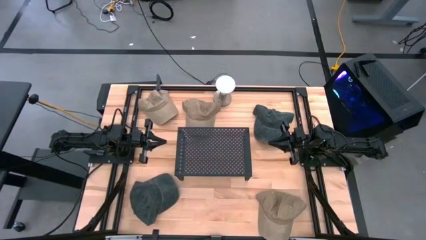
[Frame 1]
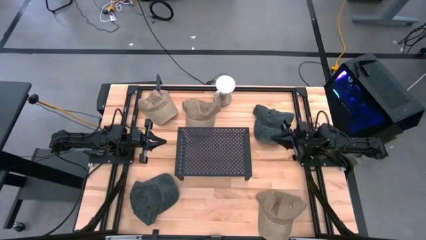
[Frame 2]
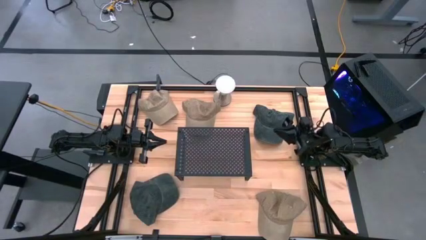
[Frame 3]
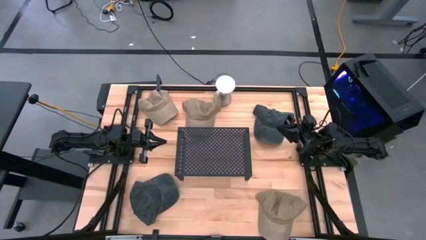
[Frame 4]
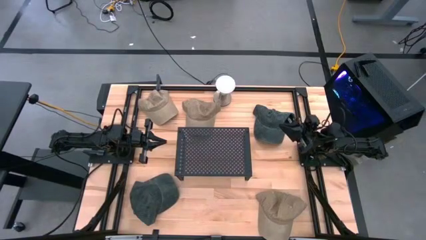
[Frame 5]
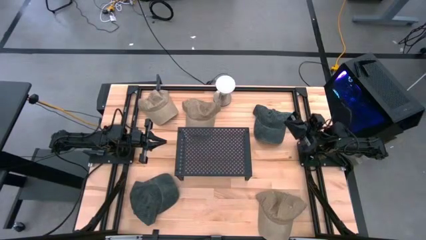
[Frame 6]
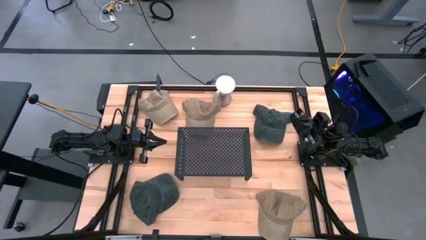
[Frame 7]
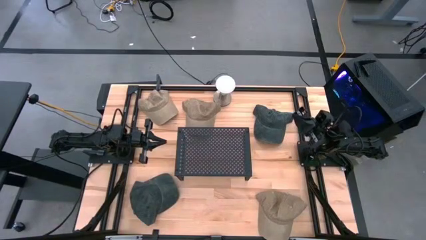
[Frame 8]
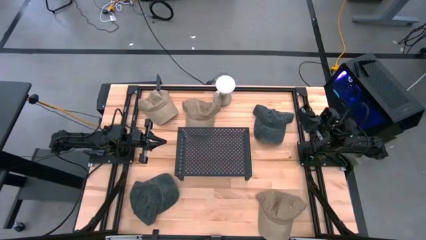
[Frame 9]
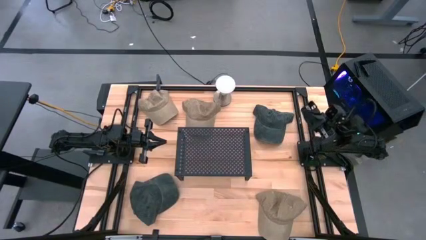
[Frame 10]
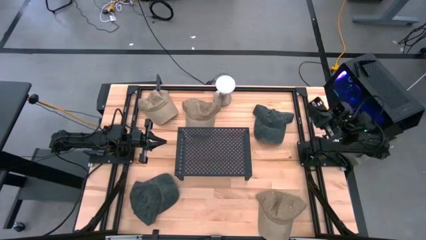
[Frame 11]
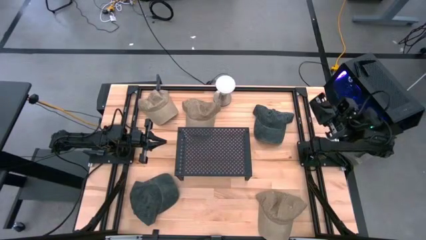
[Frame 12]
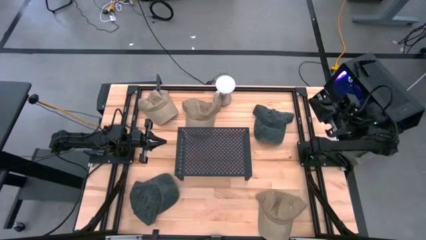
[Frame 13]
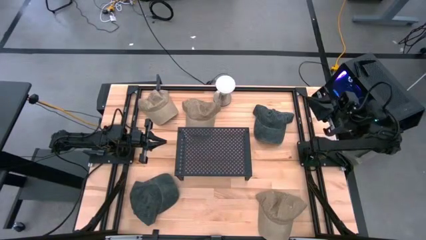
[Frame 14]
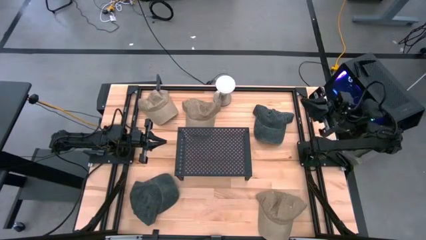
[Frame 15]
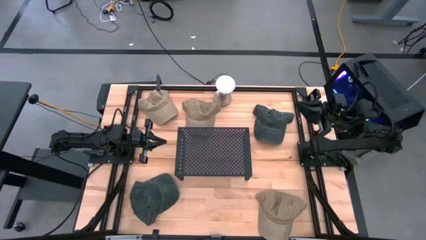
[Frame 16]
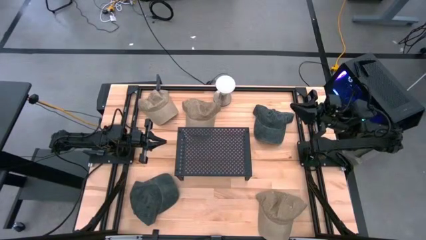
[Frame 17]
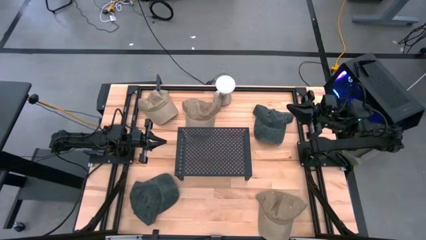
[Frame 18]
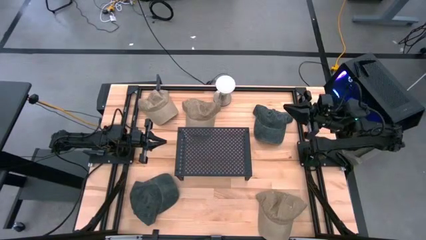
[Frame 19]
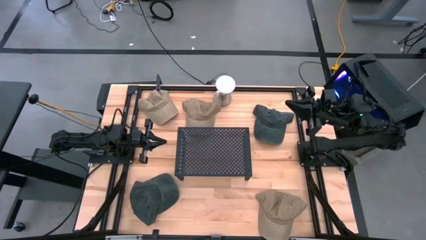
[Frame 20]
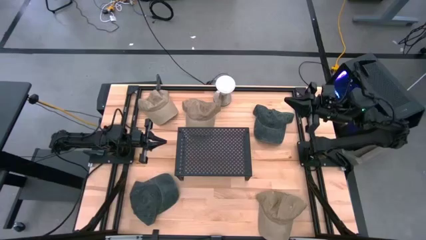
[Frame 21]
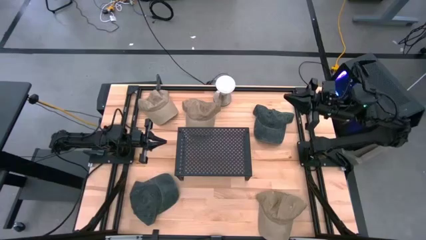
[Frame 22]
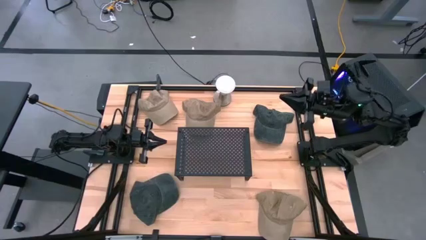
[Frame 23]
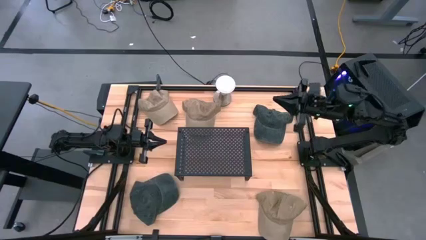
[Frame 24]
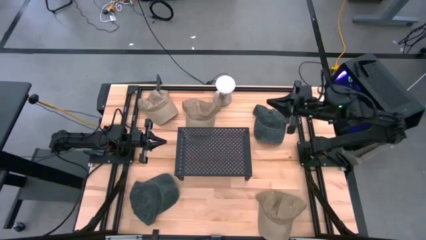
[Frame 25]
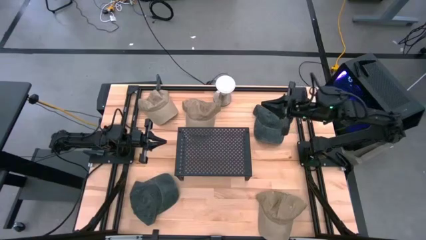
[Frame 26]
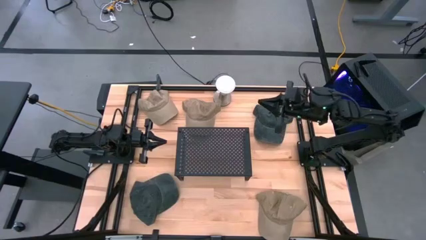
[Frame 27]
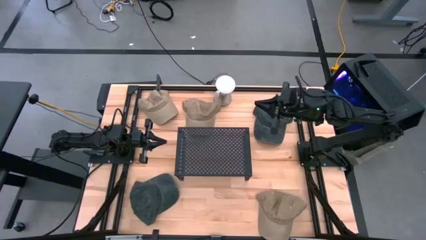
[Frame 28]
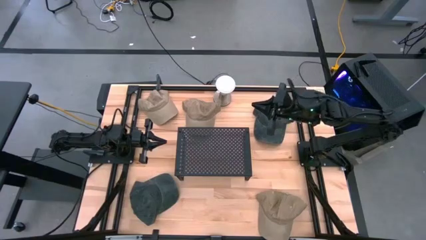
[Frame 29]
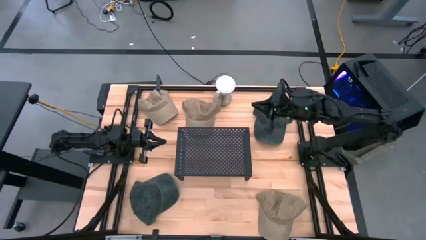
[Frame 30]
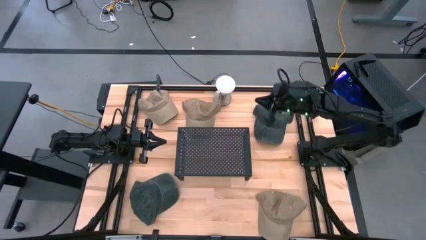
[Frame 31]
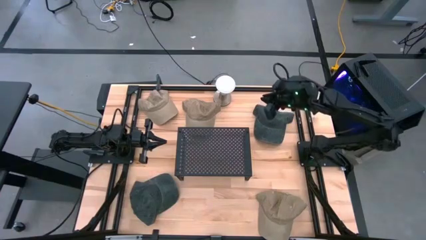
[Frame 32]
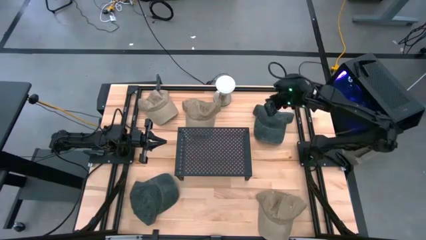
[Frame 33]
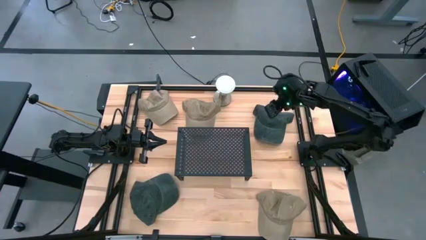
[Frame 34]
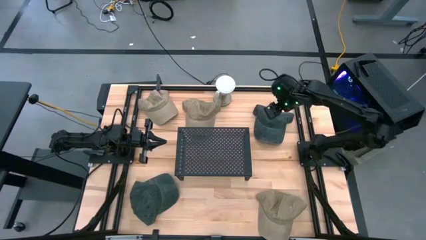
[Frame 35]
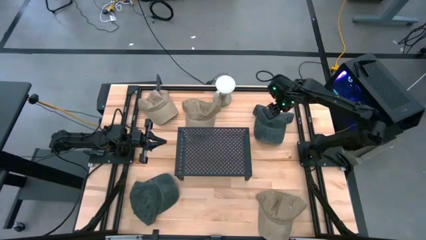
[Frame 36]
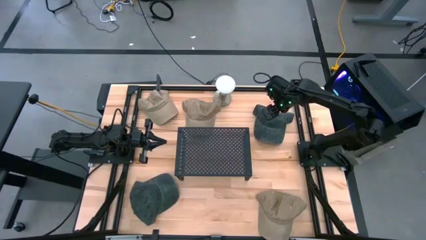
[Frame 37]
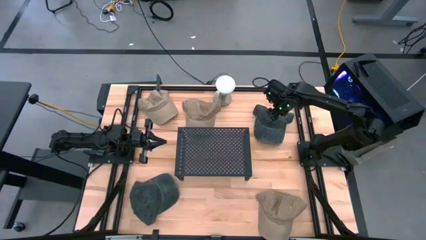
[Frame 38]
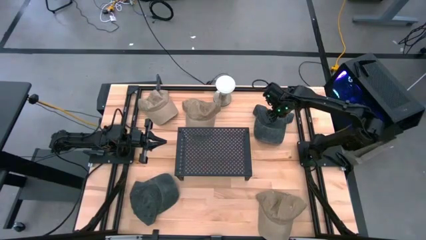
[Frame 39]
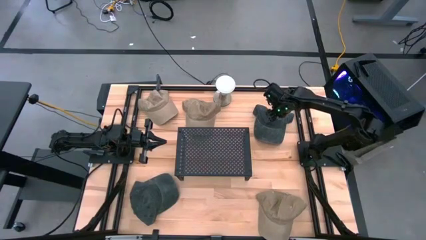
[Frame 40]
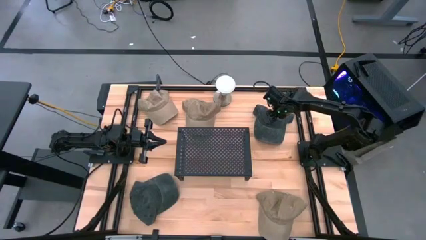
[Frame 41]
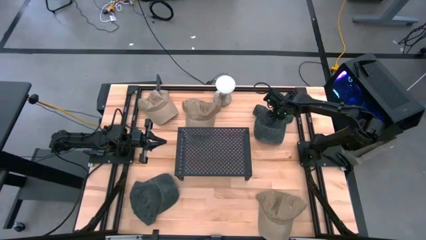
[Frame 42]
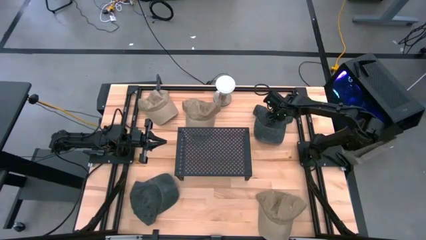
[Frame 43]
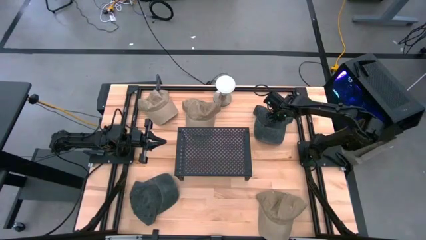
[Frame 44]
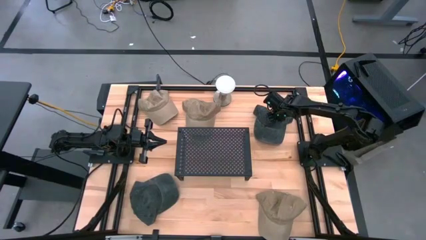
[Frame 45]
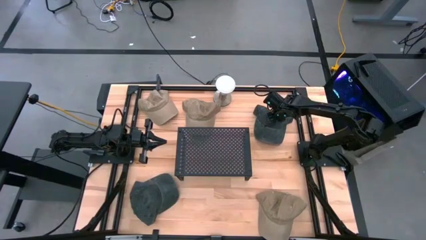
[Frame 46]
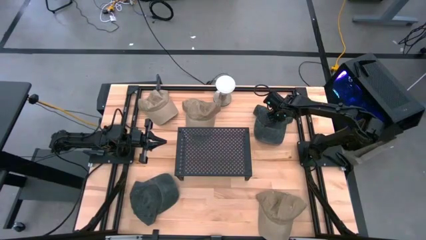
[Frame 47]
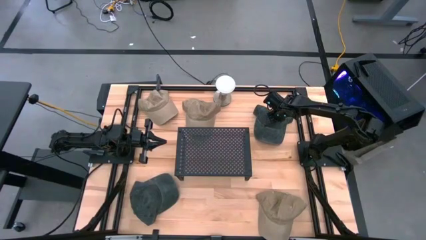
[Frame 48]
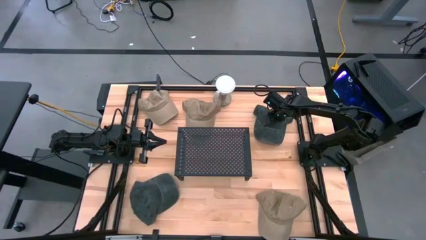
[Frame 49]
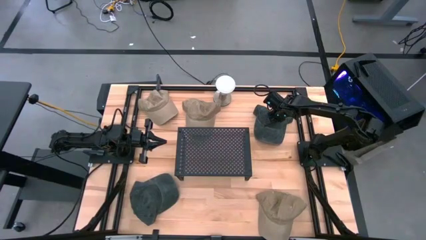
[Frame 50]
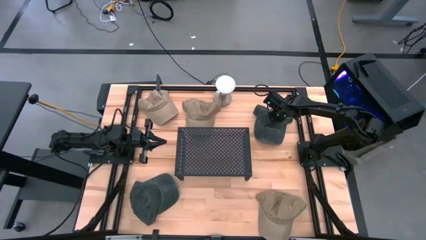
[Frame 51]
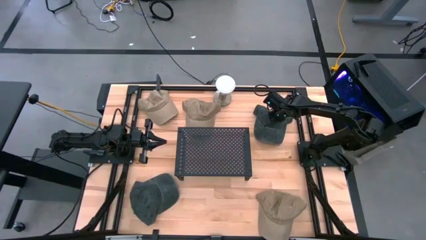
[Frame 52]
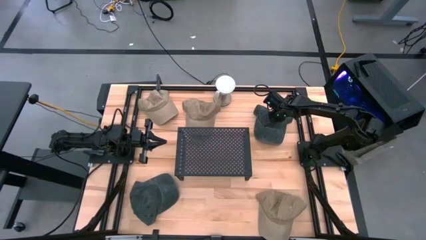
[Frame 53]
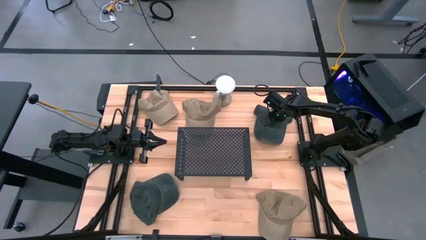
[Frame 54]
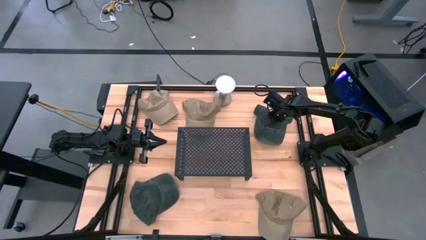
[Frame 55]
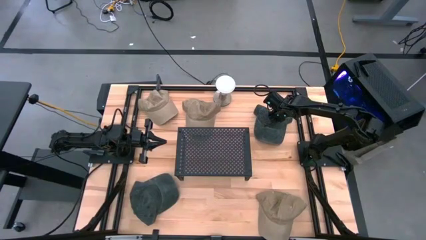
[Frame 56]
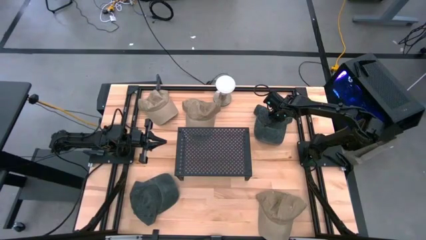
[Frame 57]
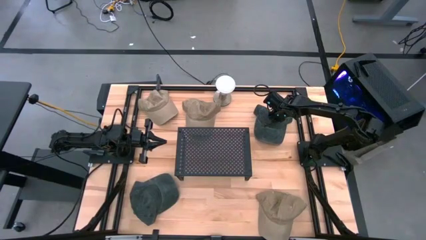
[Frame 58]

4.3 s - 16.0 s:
Task: Pick & Place hat
Put the top black cap on the shelf
